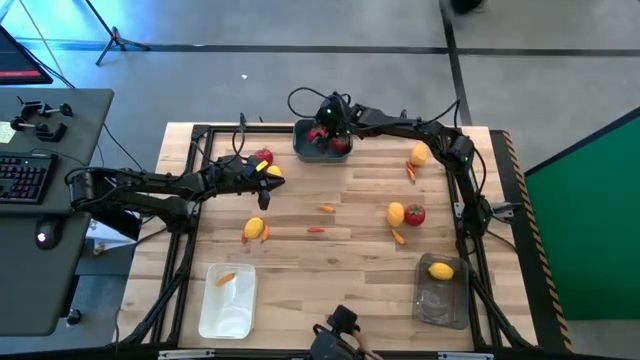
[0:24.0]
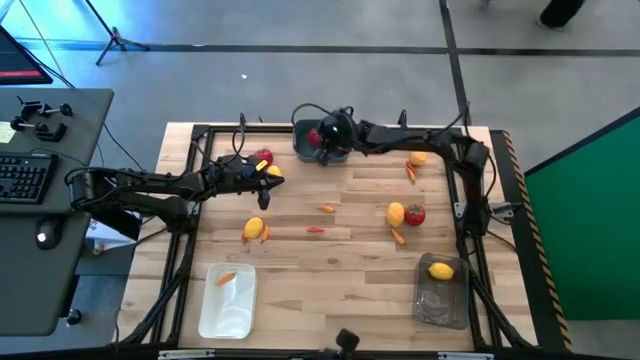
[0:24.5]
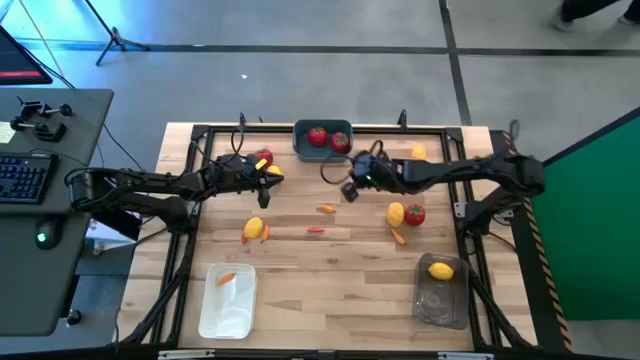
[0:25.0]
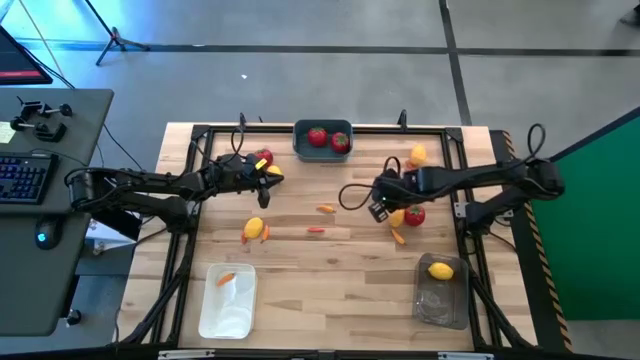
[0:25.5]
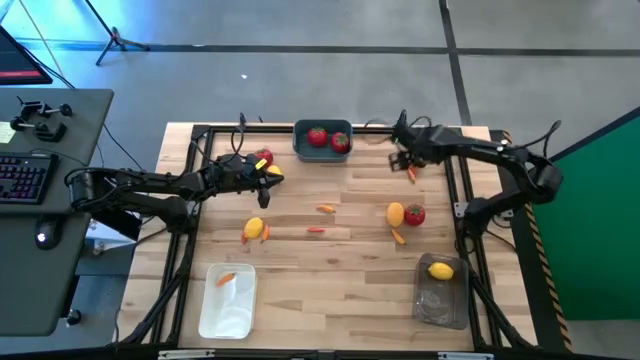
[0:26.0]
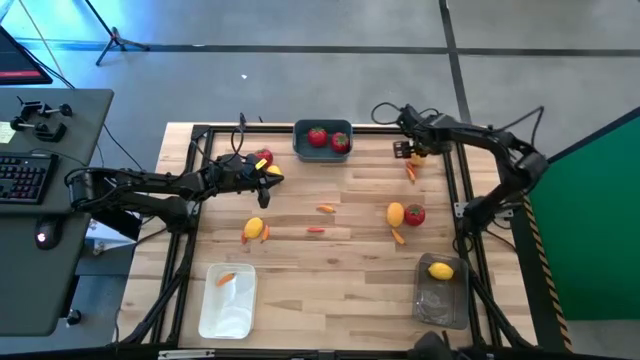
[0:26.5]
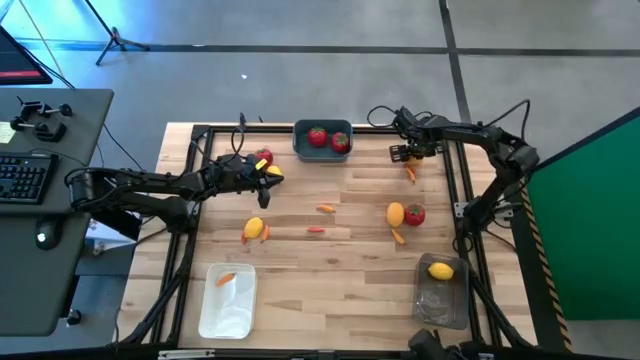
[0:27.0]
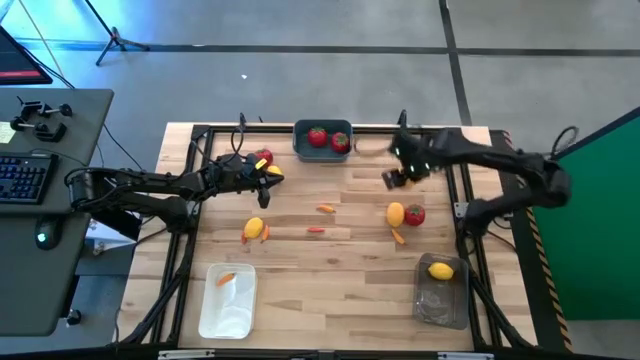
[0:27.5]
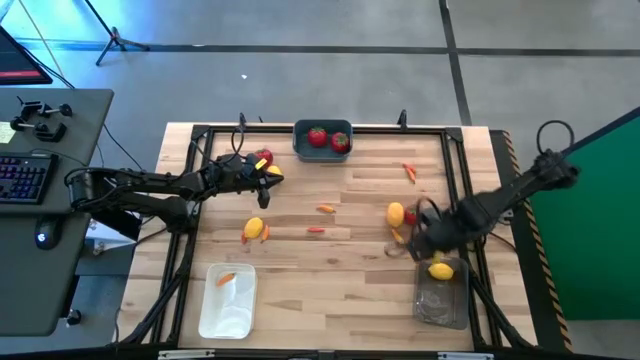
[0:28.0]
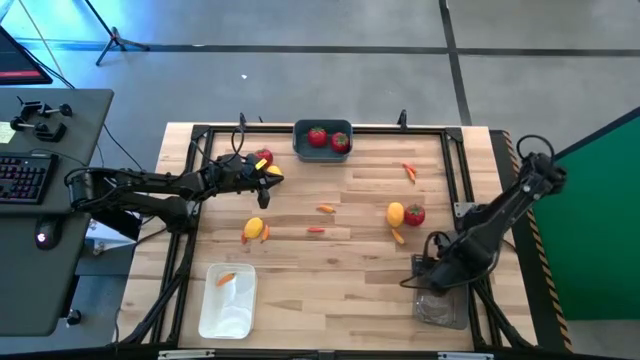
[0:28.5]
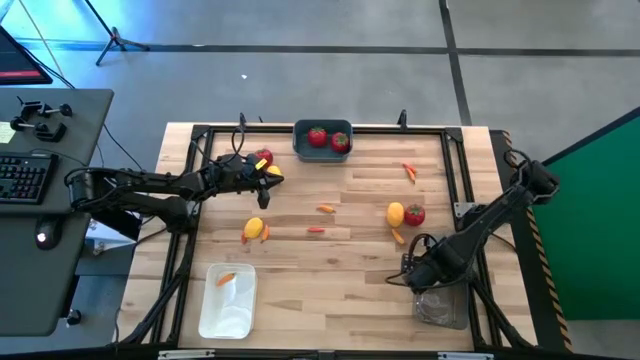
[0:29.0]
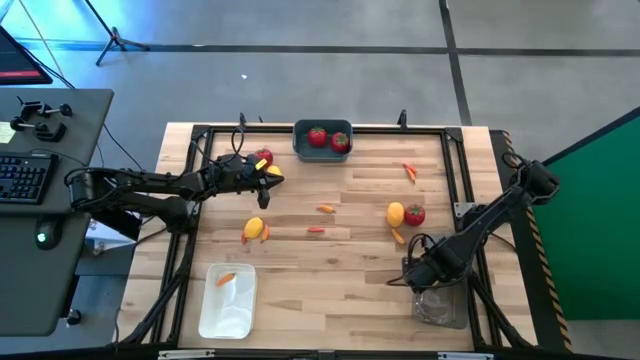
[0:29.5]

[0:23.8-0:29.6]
Task: Sort produce into baskets
Put the top right yellow lemon into the black transparent bin

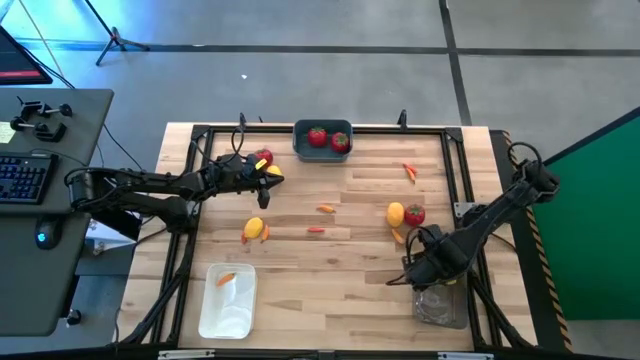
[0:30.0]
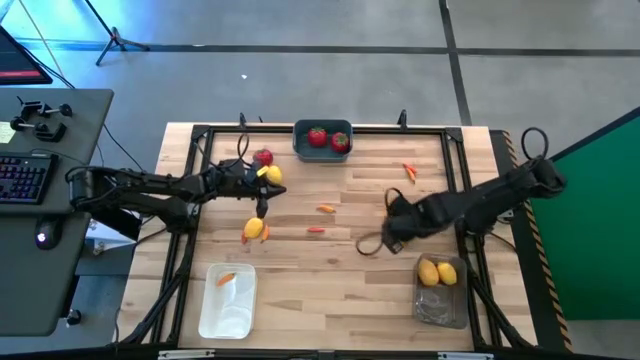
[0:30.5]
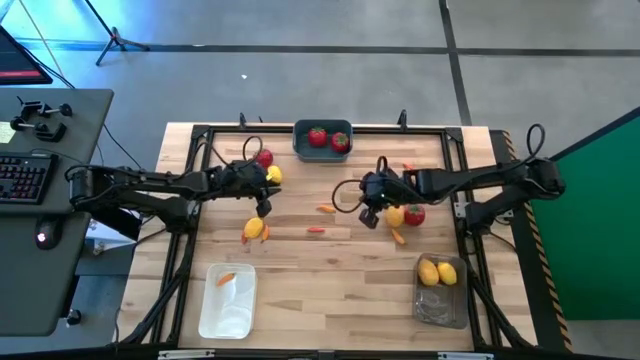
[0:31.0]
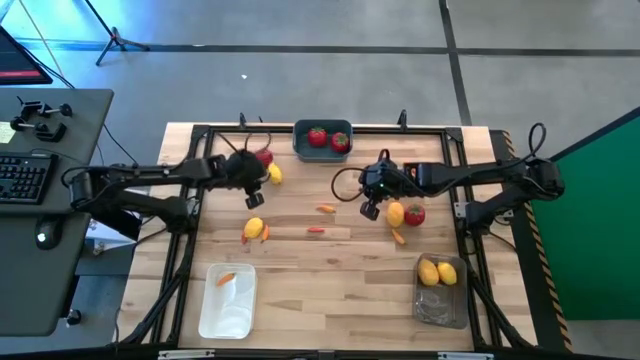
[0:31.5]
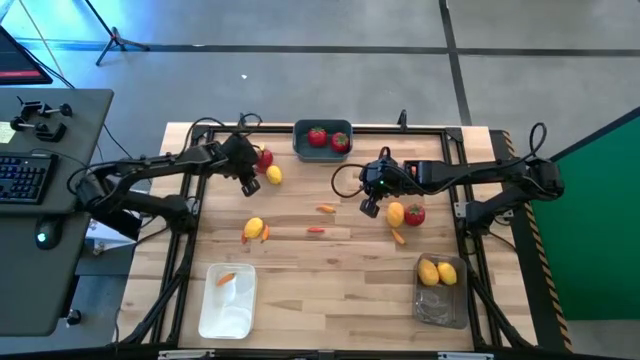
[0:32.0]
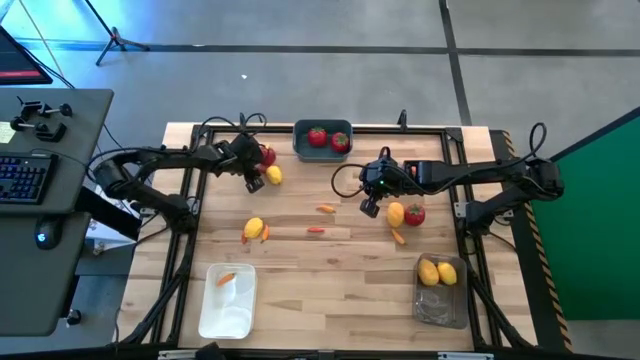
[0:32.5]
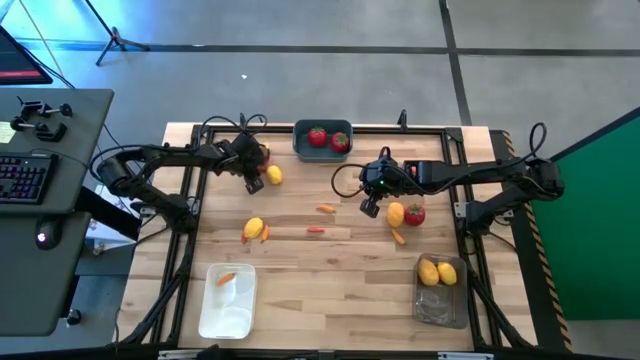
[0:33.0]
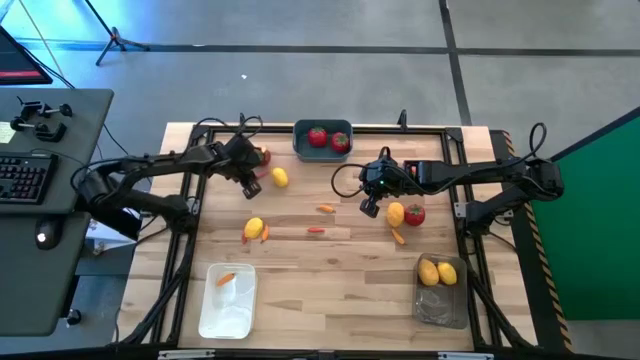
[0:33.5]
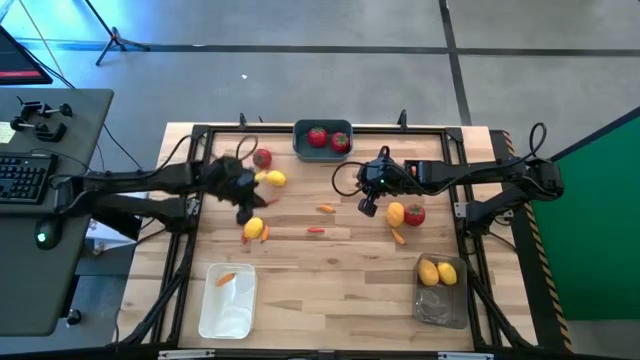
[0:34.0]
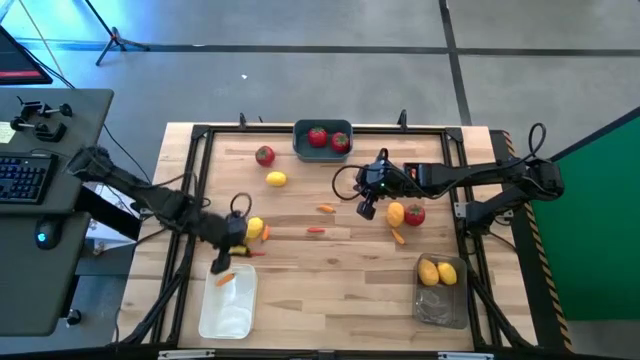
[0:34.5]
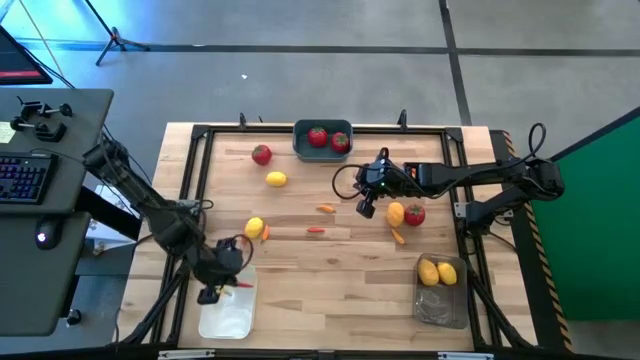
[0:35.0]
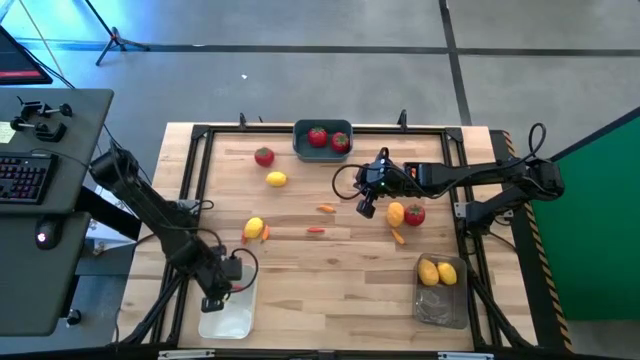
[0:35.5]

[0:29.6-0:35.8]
Put the top left red chili pepper into the white bin

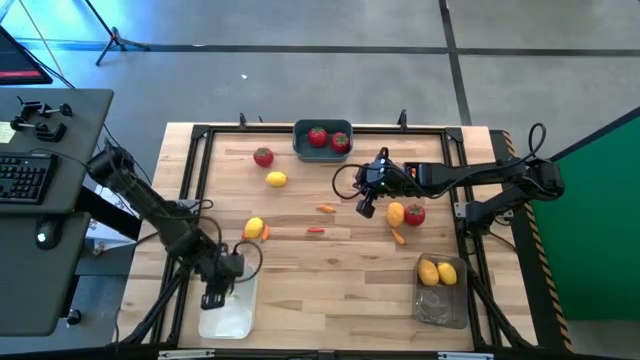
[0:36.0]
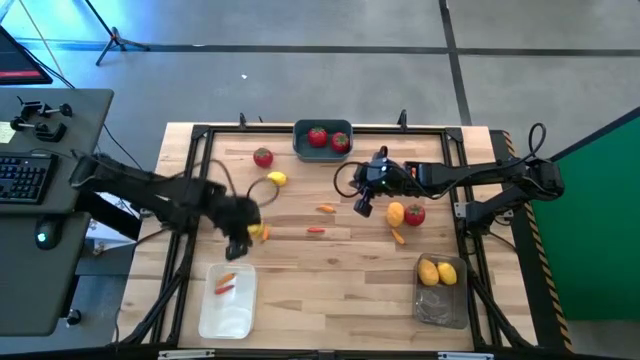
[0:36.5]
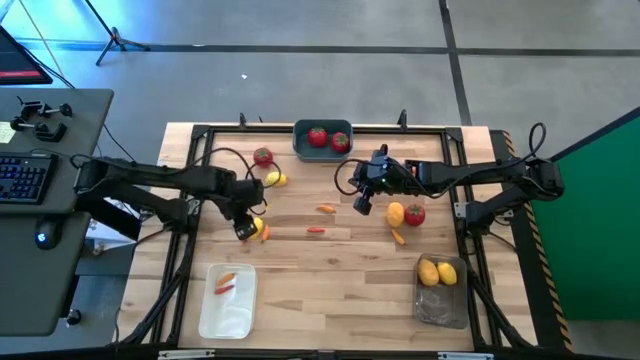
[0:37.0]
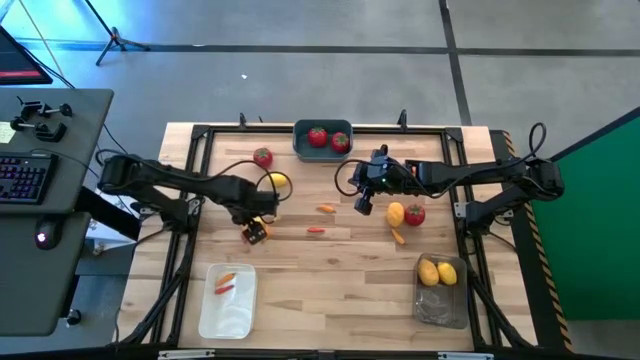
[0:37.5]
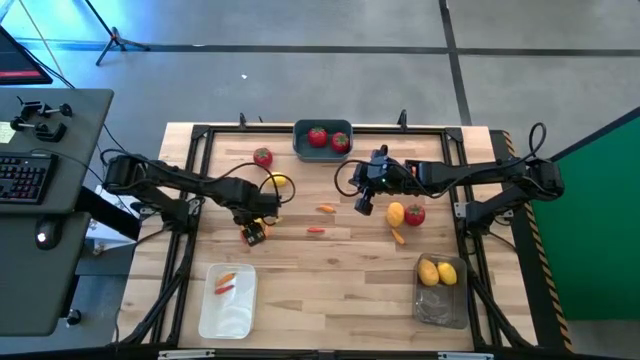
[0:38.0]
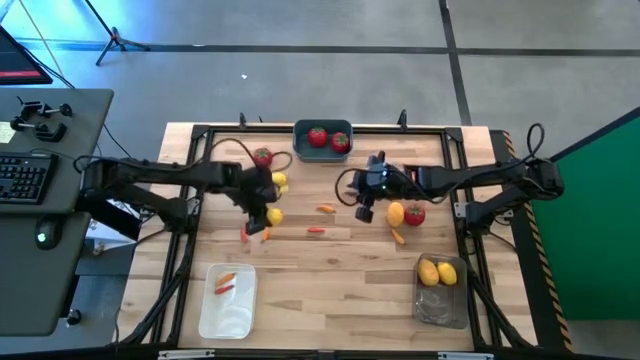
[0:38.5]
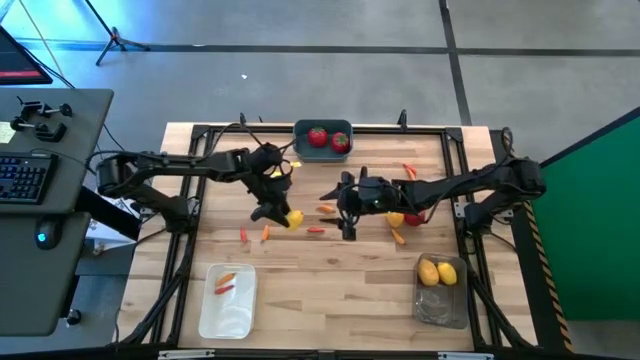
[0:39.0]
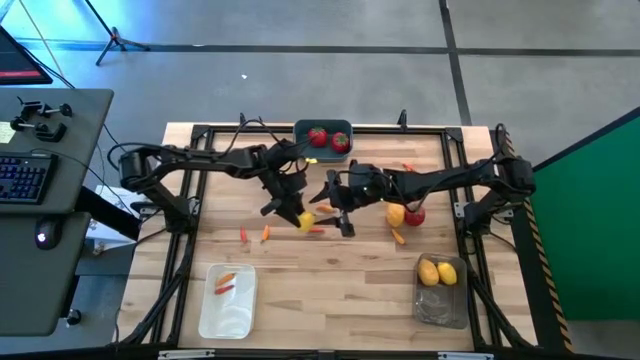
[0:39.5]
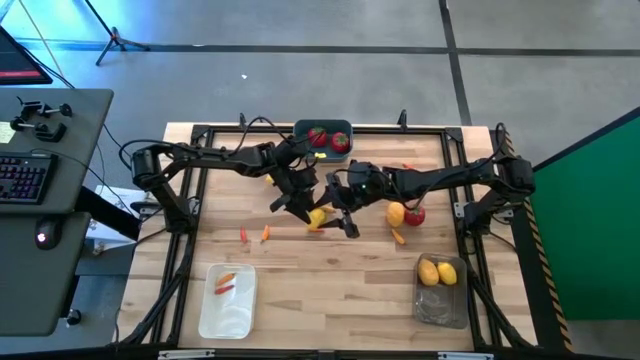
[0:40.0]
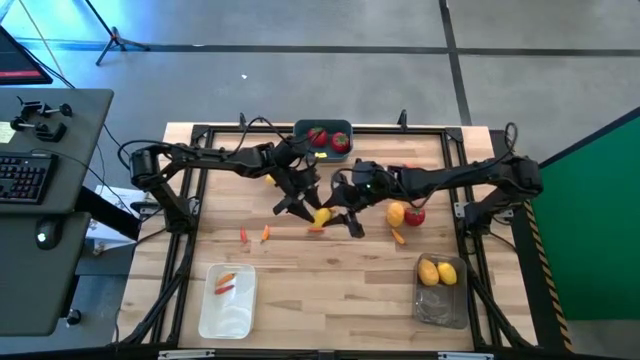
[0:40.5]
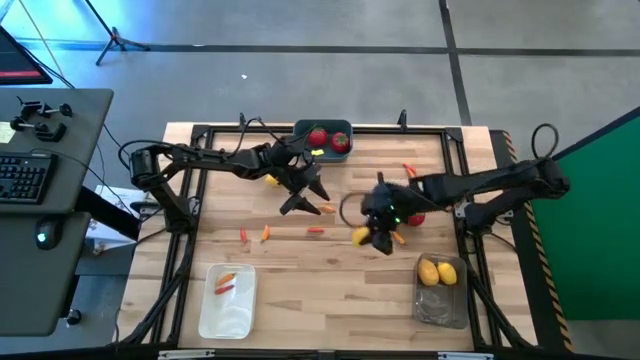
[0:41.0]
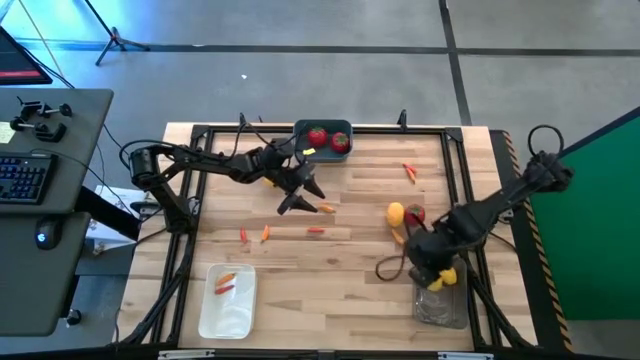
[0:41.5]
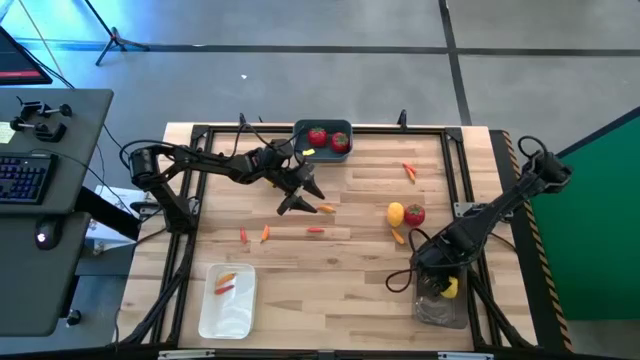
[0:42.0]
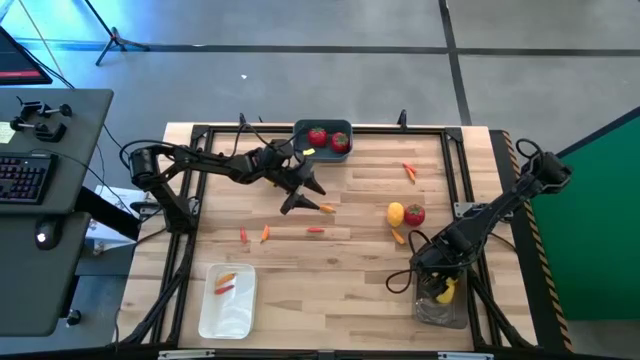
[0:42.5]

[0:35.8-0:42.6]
Put the bottom left yellow lemon into the black transparent bin

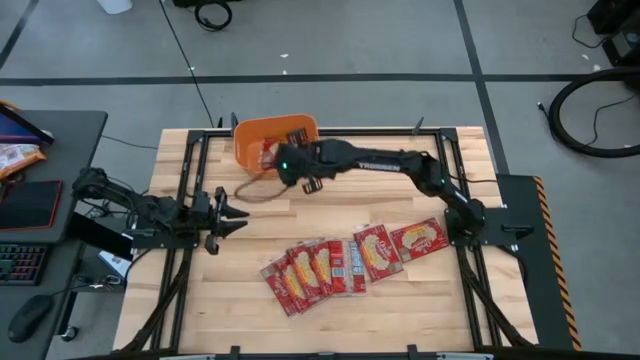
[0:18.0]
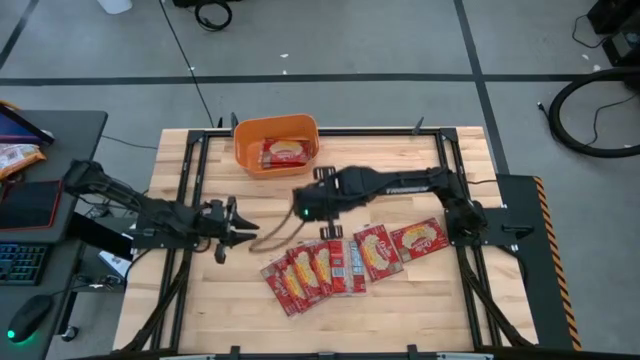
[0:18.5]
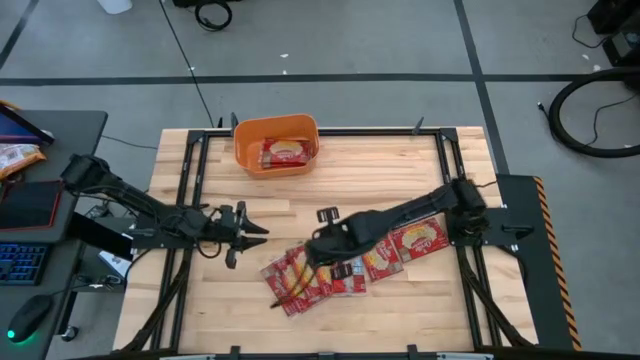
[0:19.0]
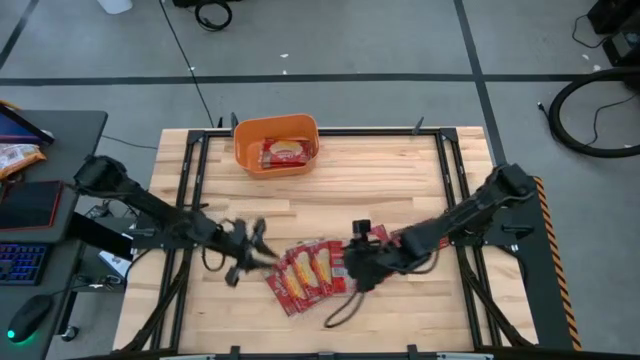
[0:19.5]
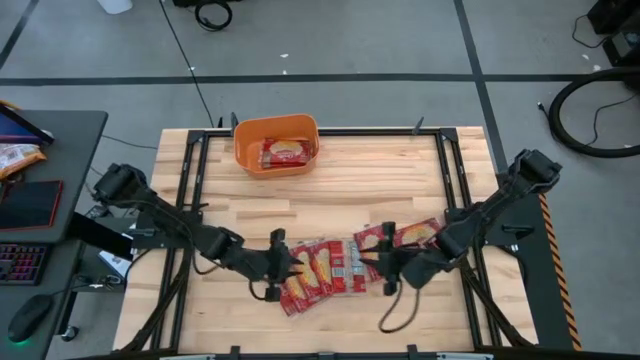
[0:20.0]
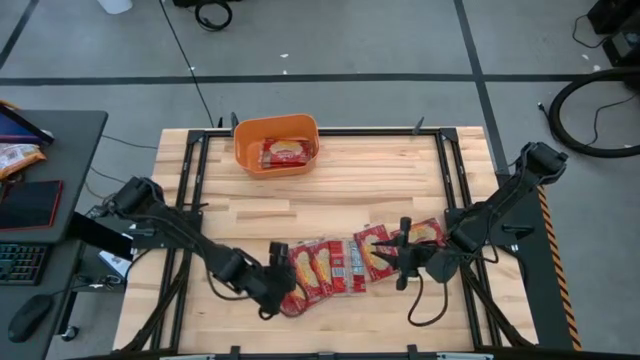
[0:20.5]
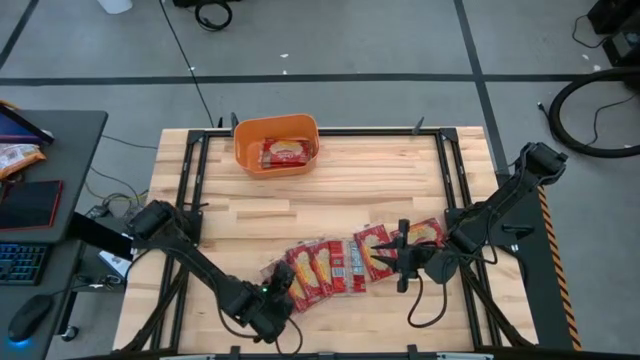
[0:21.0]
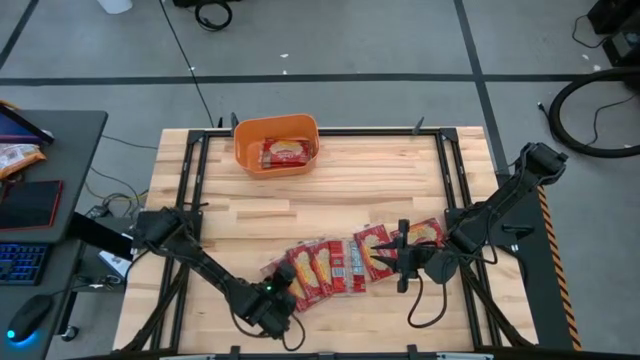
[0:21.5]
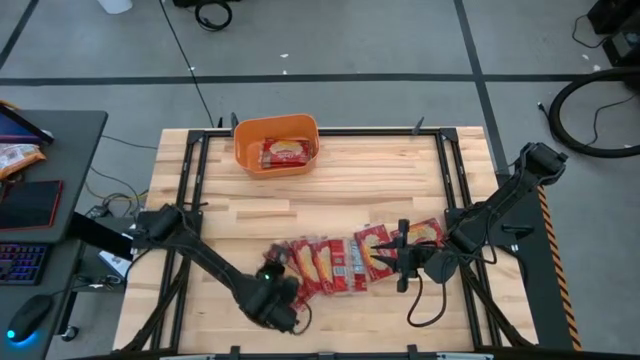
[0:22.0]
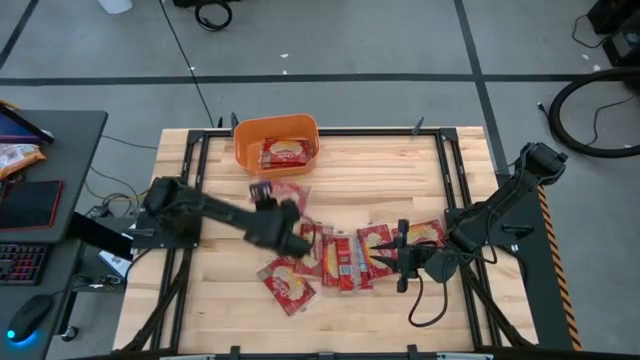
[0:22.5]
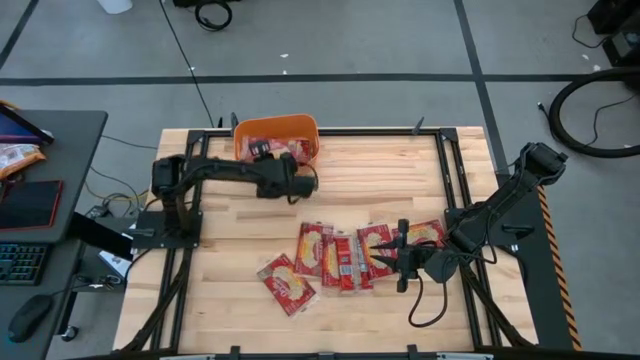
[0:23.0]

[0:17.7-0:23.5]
Task: Sort popcorn bags into baskets
Put the red popcorn bag into the orange bin
